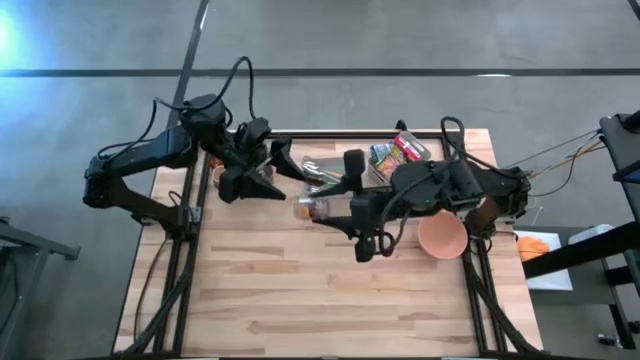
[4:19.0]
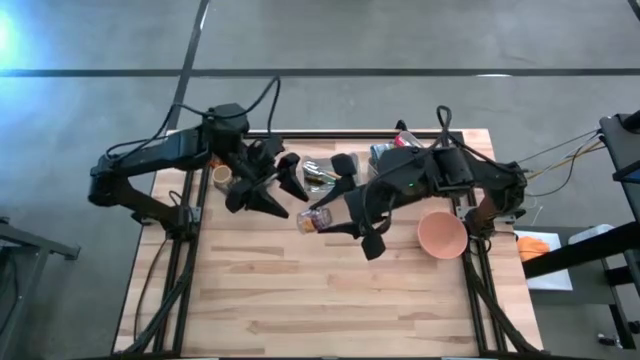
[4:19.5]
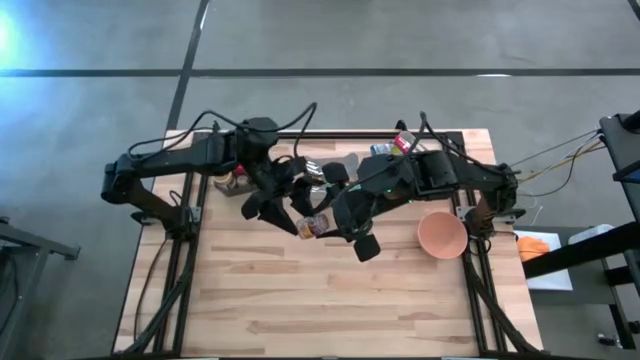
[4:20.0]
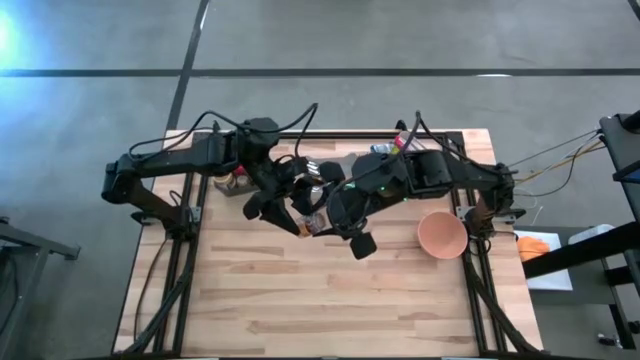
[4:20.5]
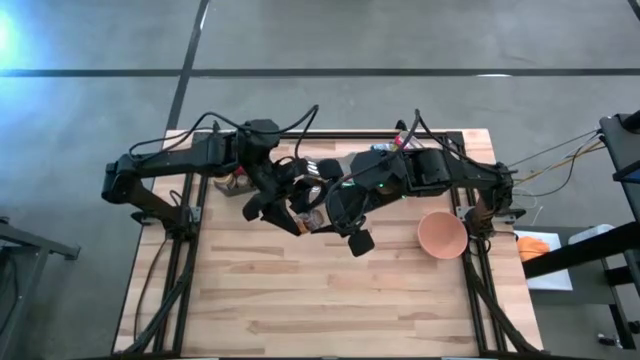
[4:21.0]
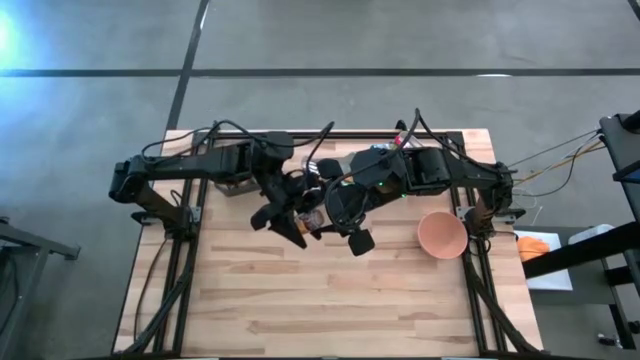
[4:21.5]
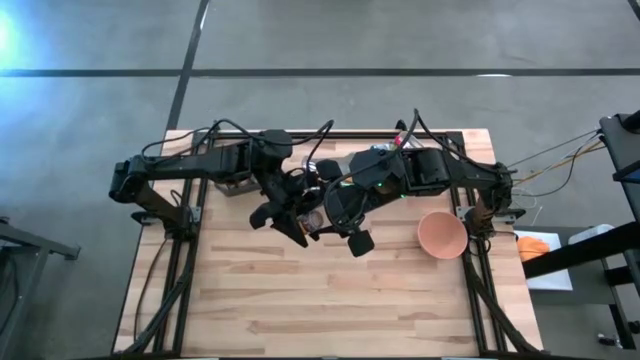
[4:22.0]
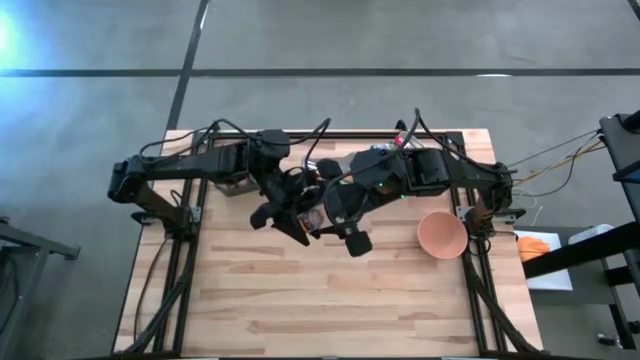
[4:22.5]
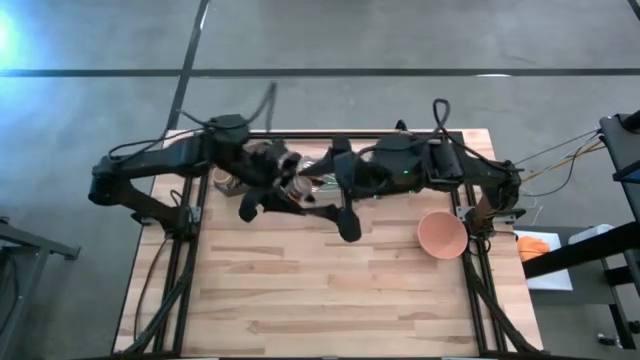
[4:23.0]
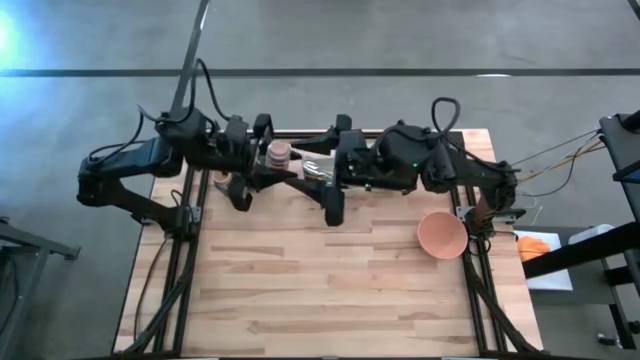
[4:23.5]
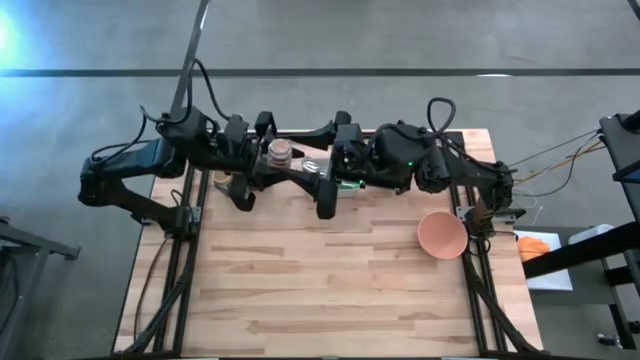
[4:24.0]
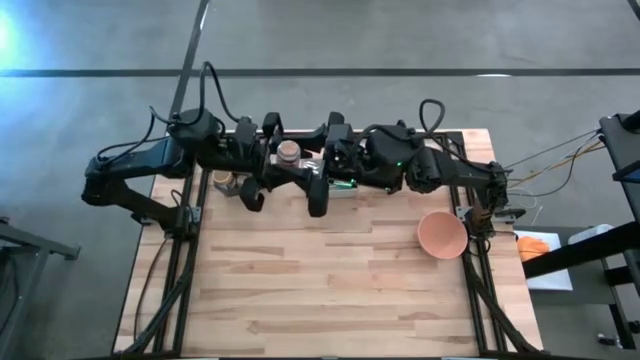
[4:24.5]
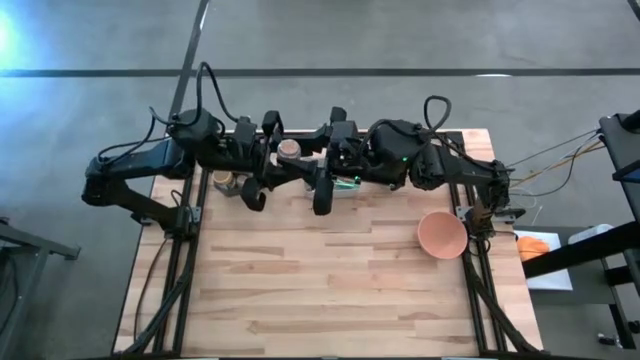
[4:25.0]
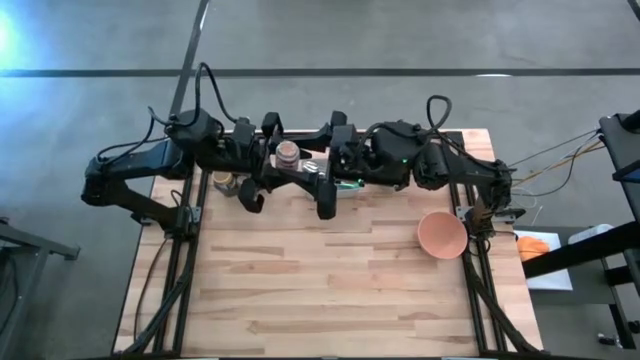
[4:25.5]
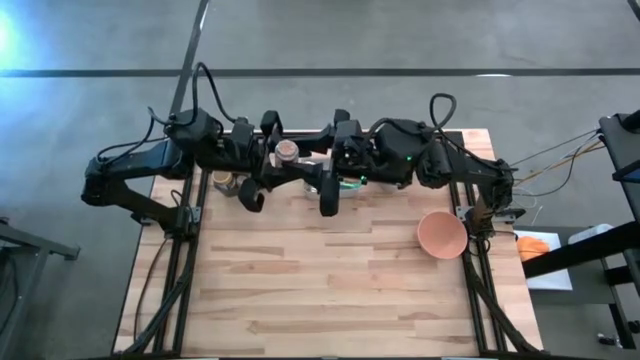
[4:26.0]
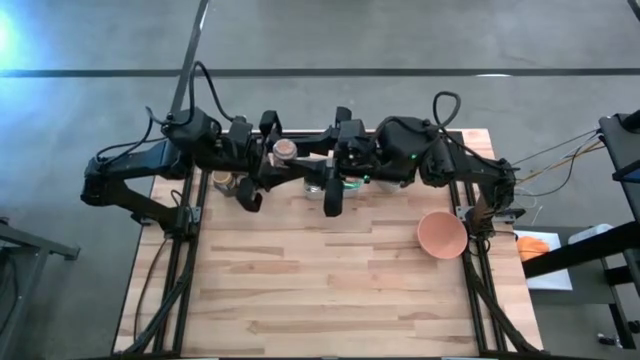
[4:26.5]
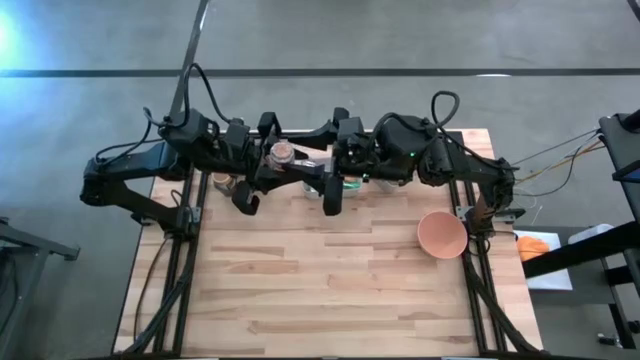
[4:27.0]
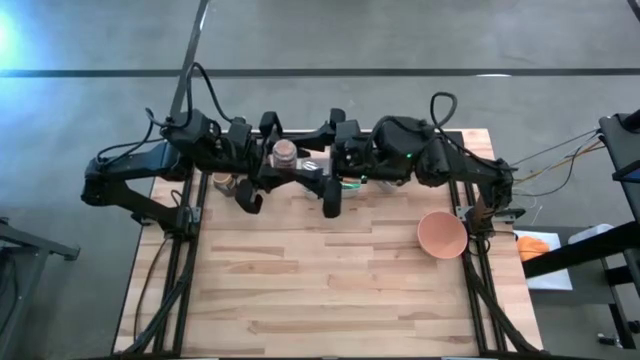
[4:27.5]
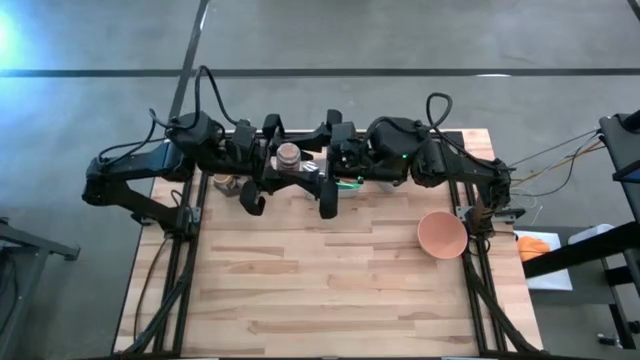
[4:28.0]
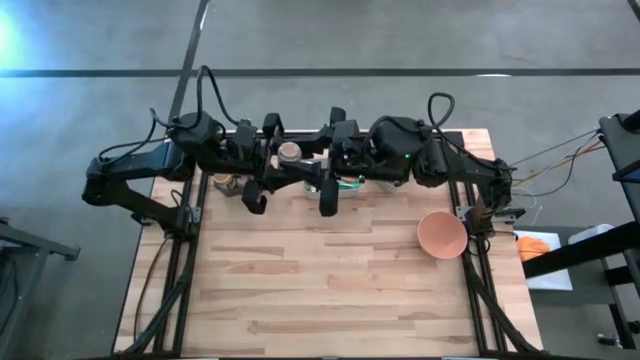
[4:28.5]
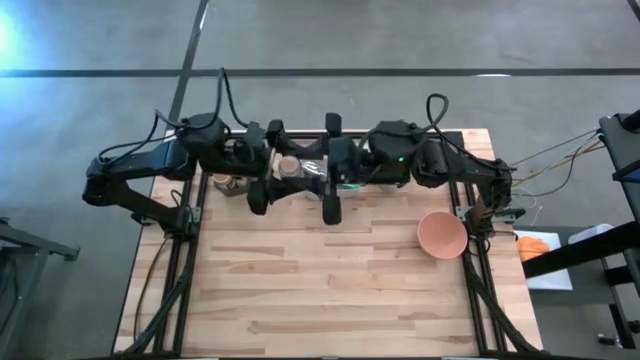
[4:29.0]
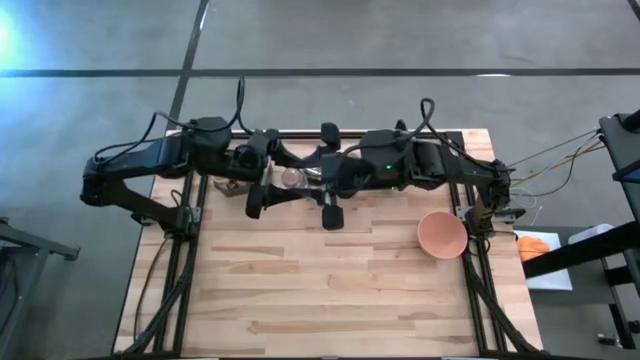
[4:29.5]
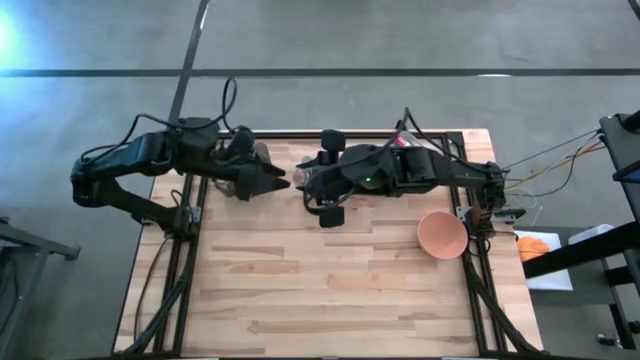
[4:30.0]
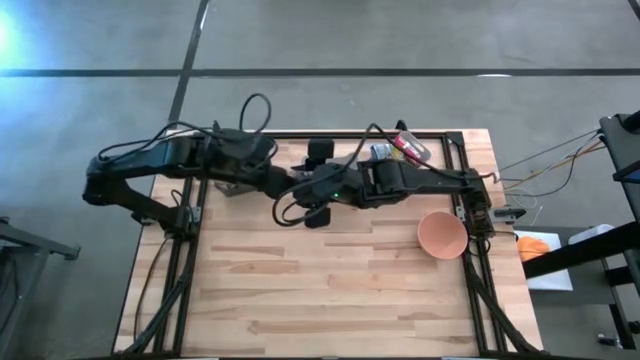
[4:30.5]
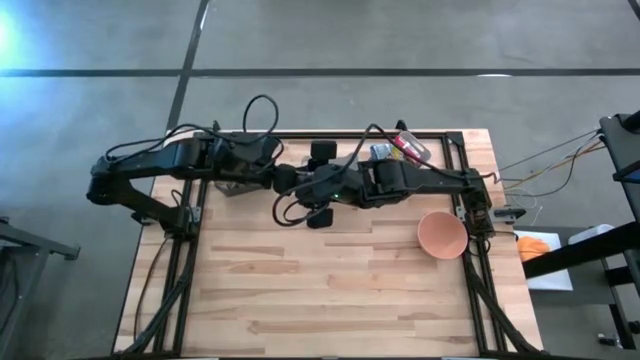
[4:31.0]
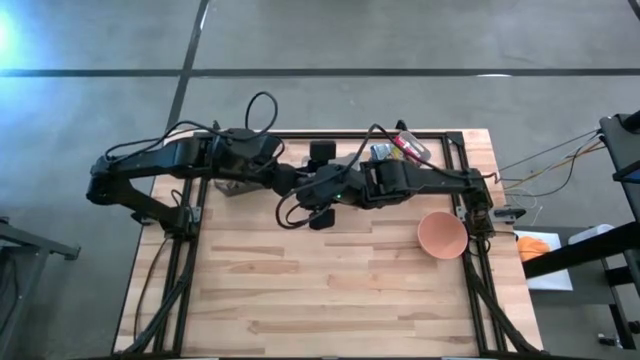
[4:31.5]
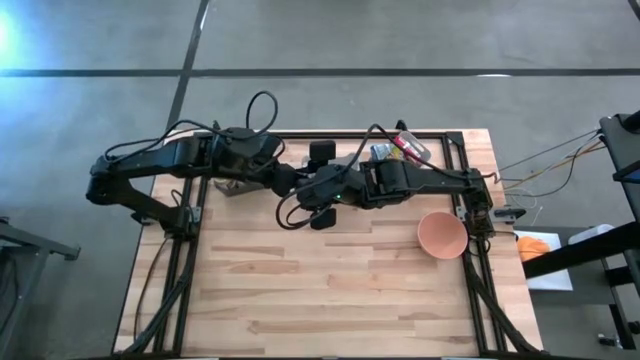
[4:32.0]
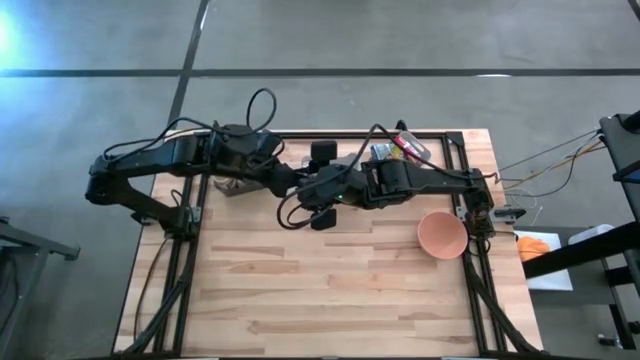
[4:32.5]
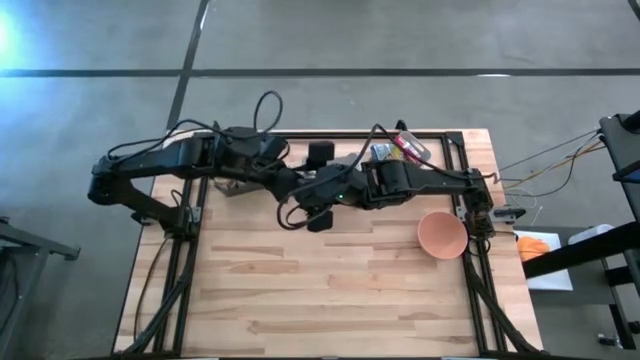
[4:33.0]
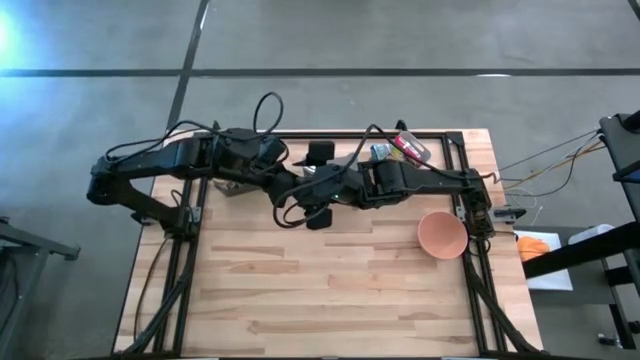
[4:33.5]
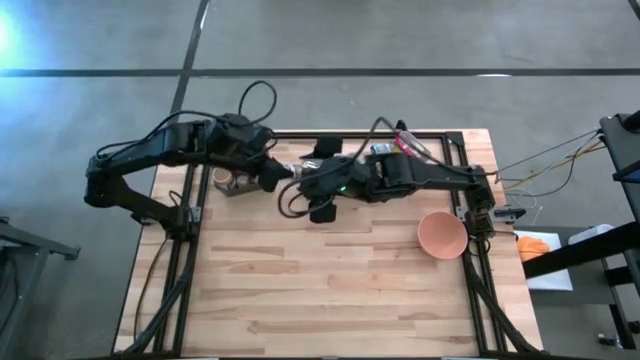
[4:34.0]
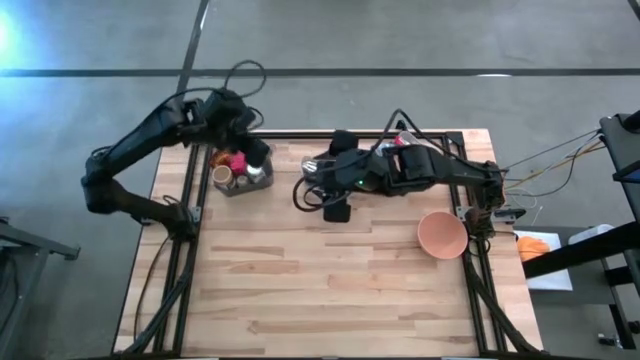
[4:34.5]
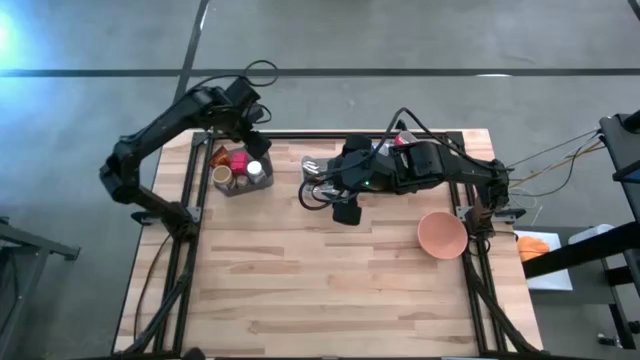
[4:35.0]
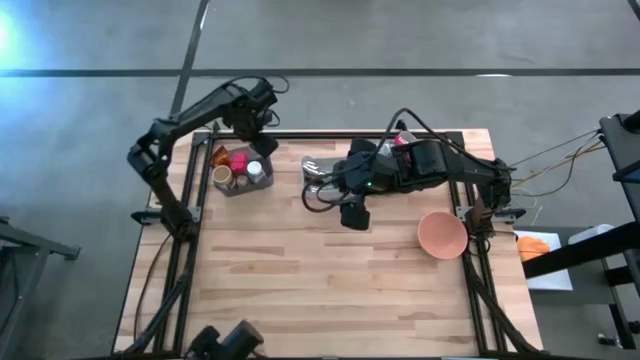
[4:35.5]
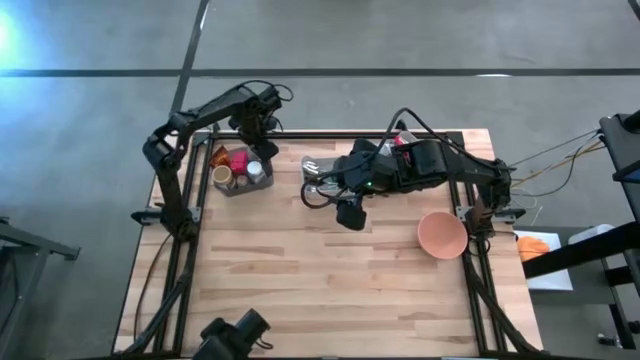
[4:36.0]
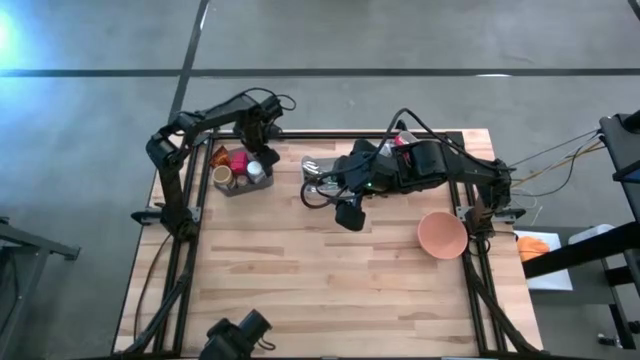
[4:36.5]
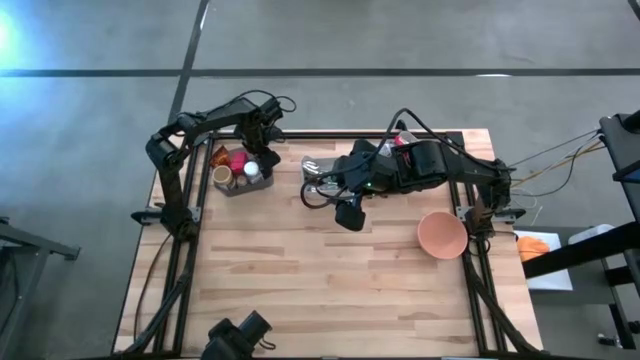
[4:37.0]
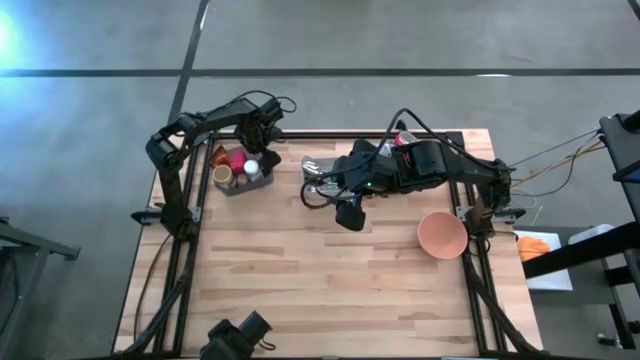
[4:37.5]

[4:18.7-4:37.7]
Put the brown seasoning bottle into the black bin
